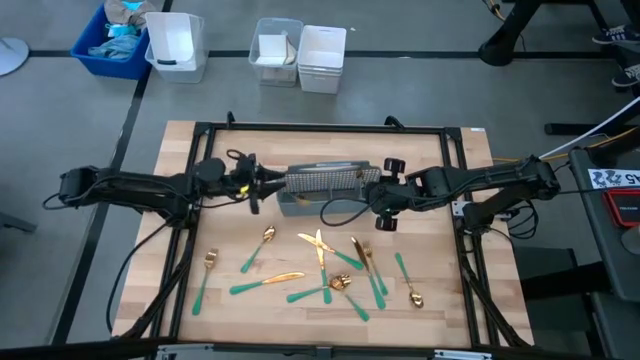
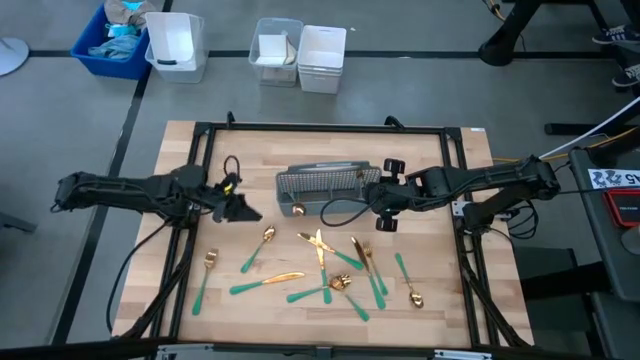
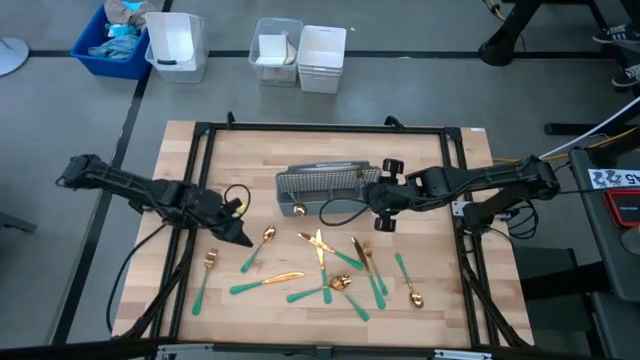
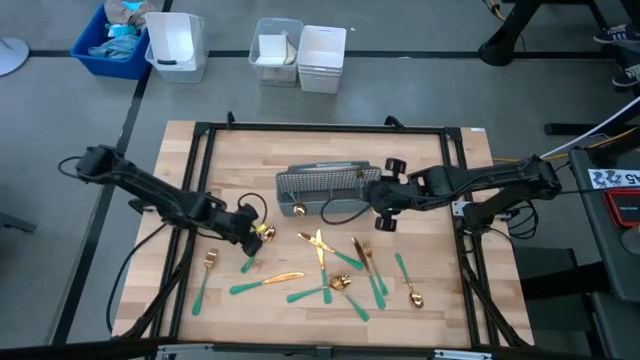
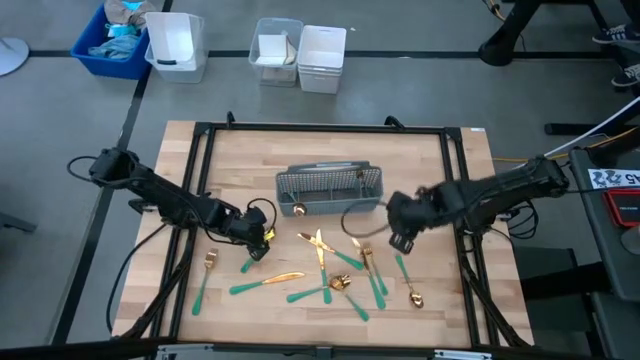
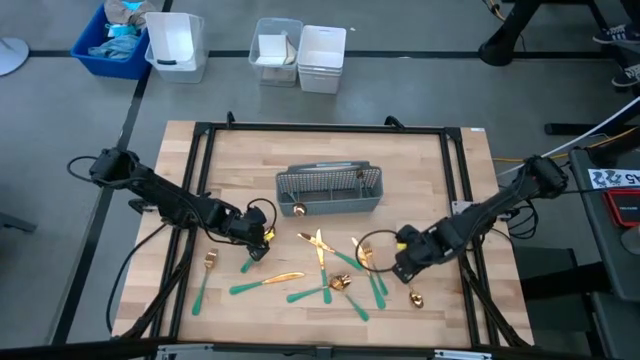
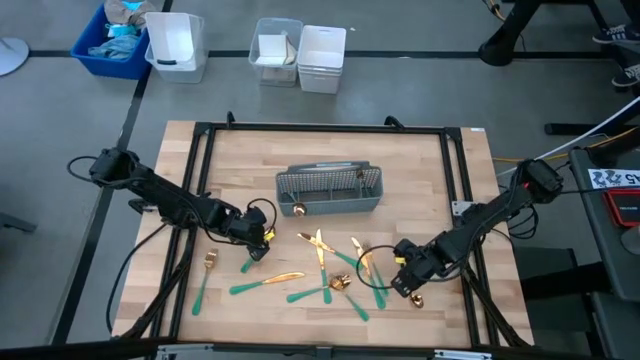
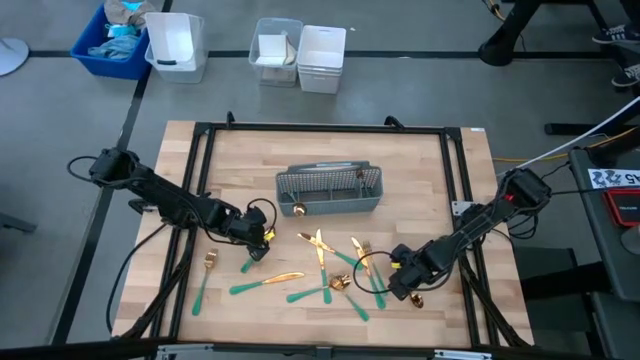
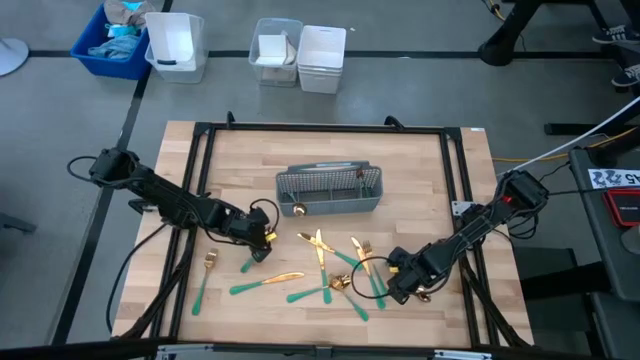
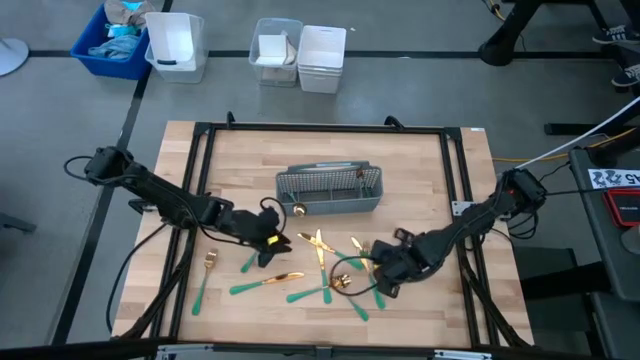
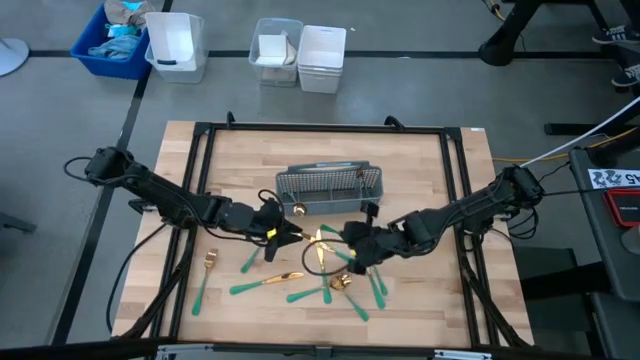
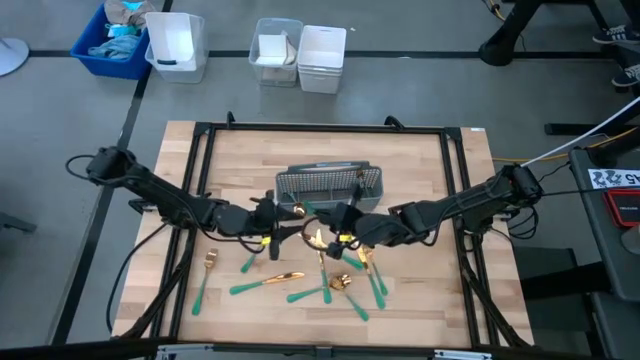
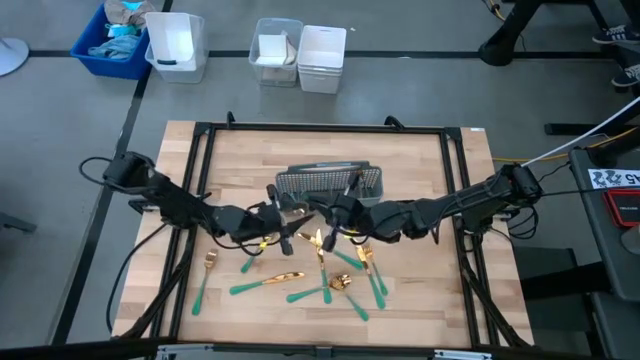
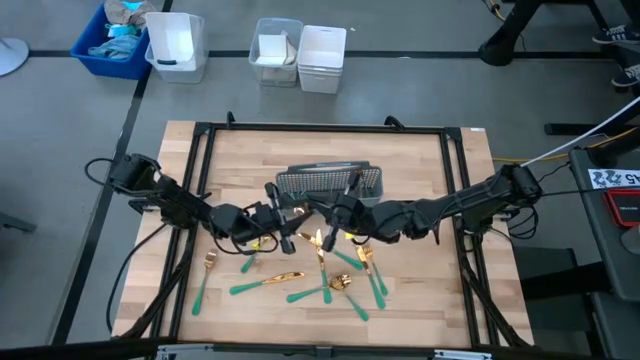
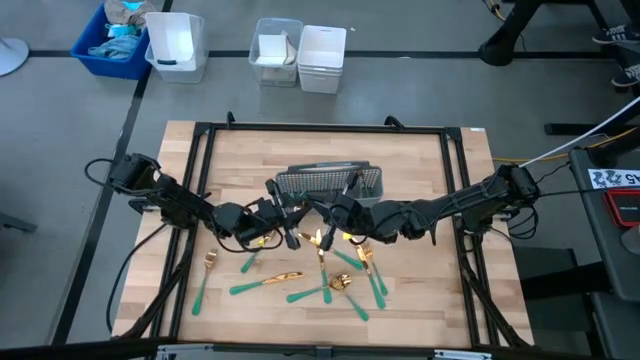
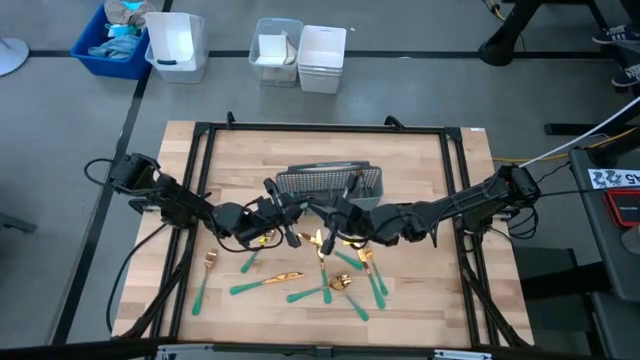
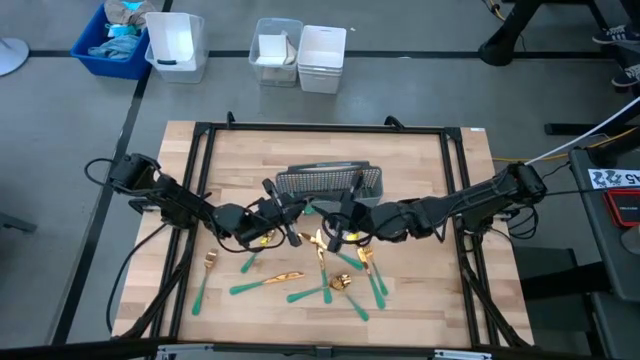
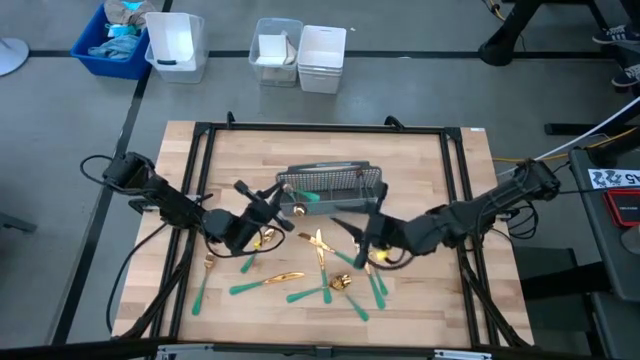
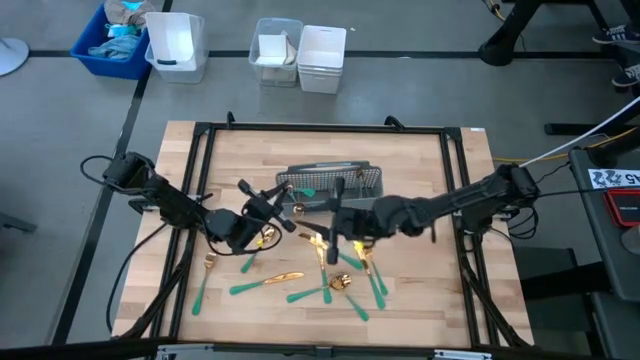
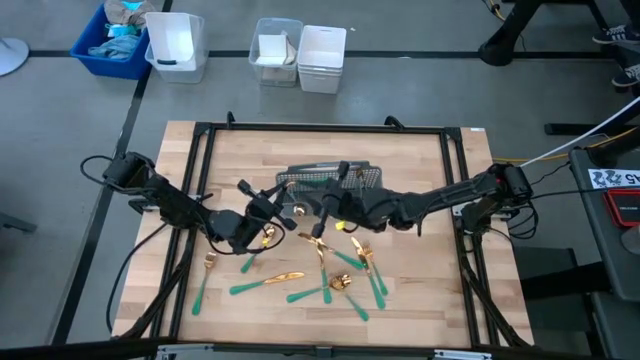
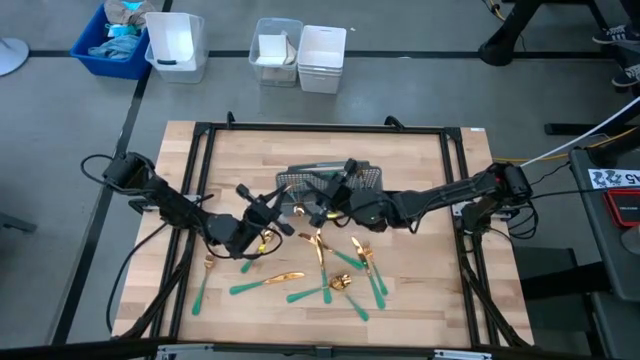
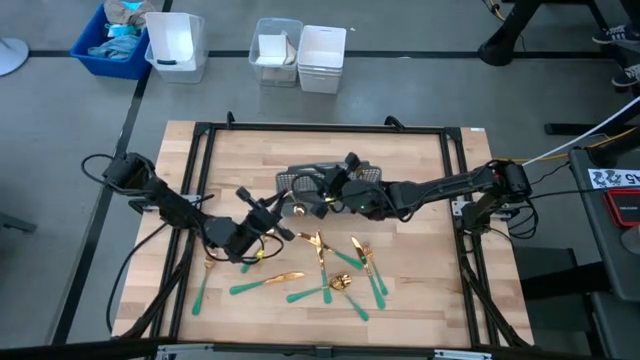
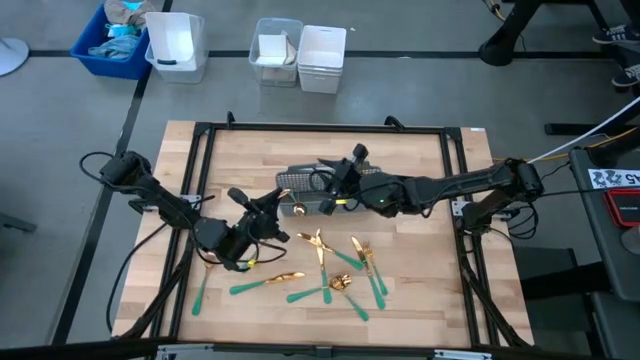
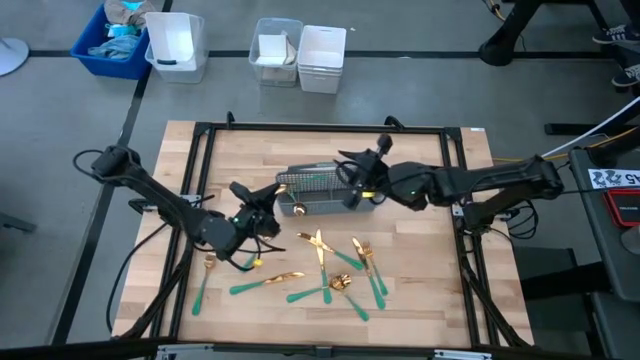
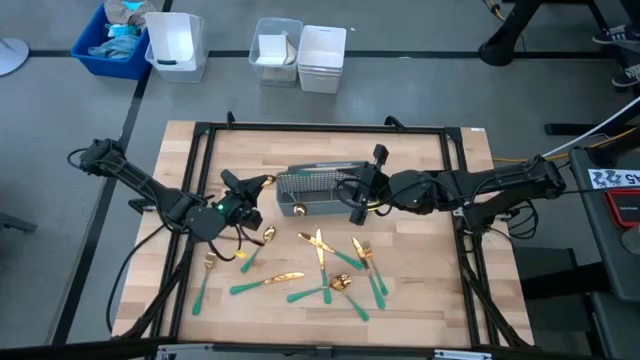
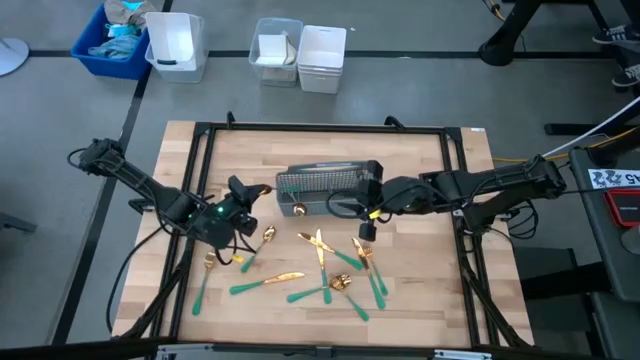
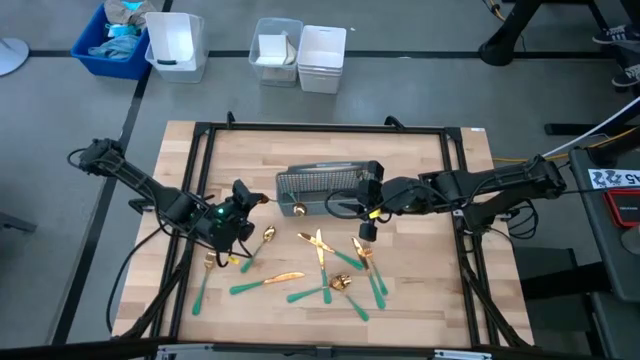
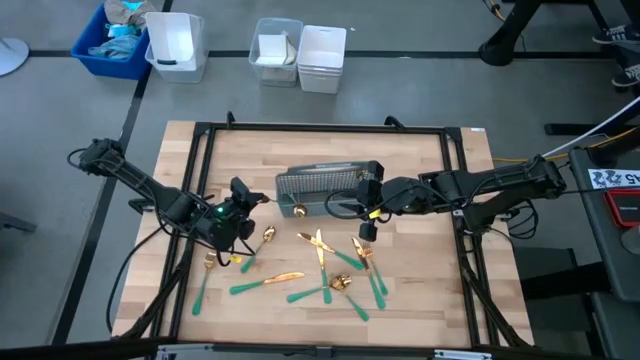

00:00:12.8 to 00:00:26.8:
Task: Sort silverware
Put the green spoon in the gray silverware basket

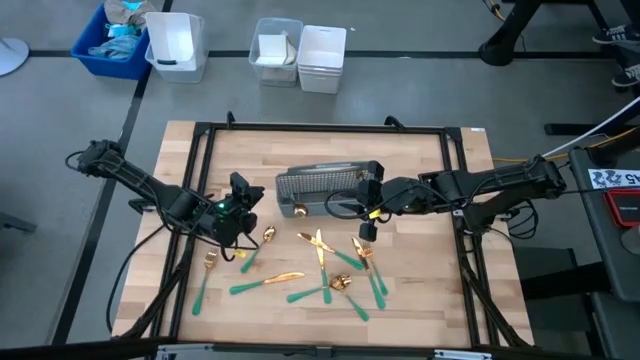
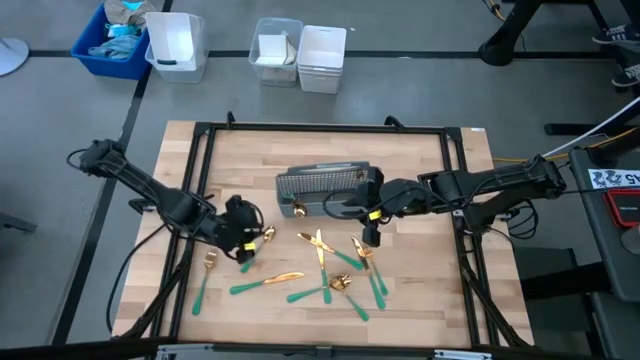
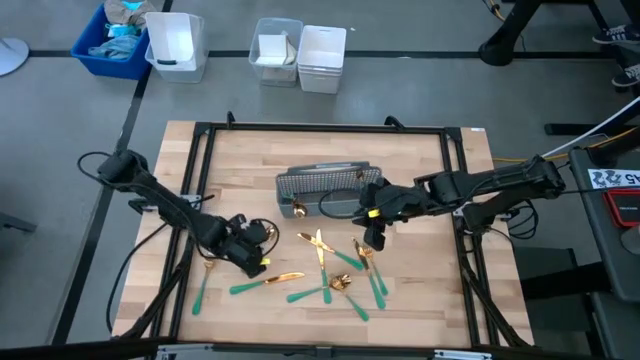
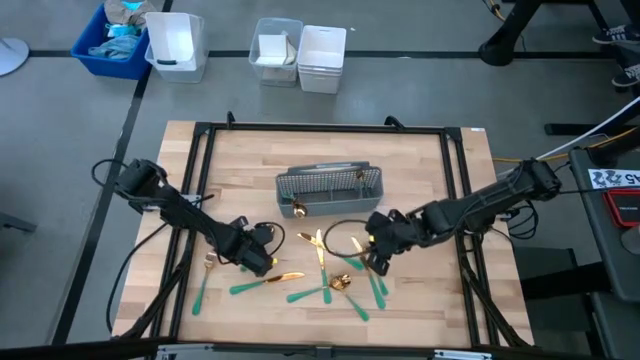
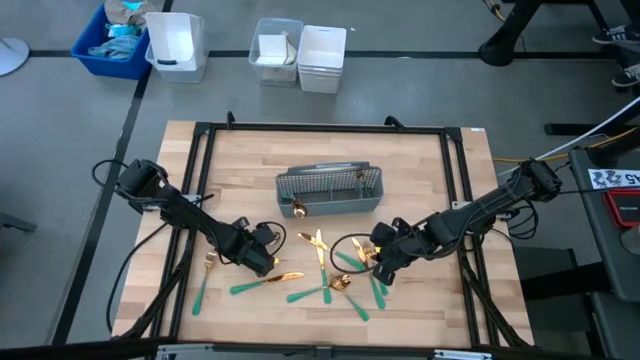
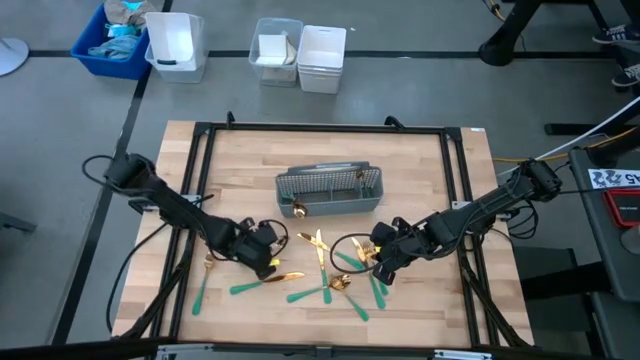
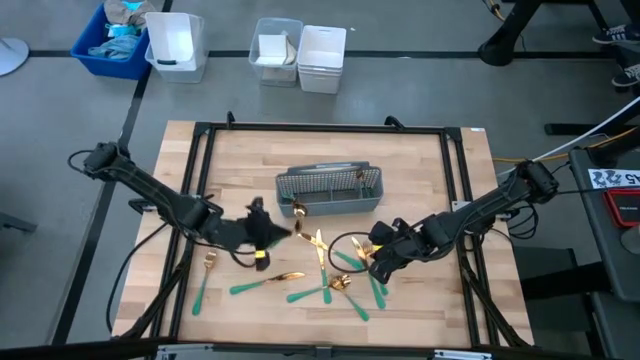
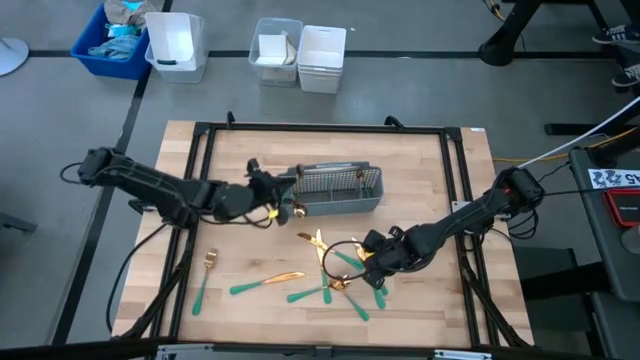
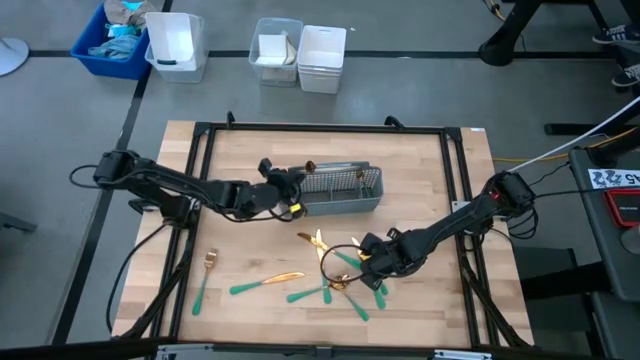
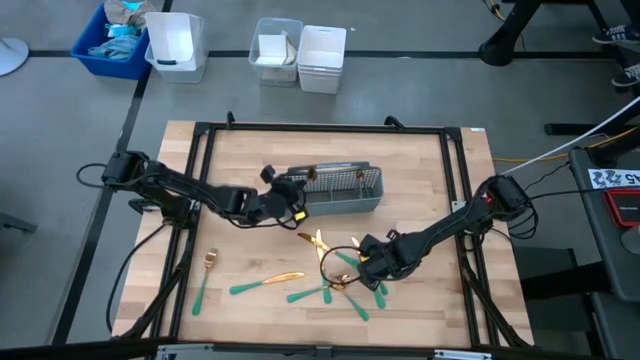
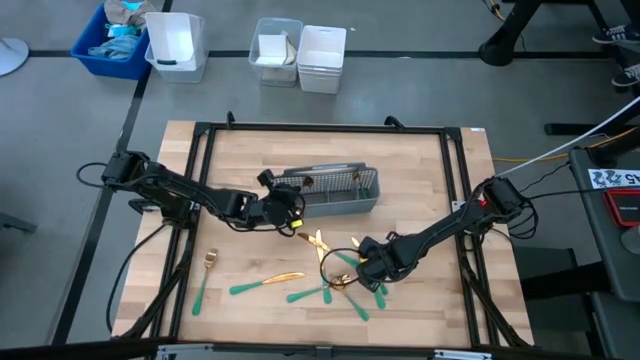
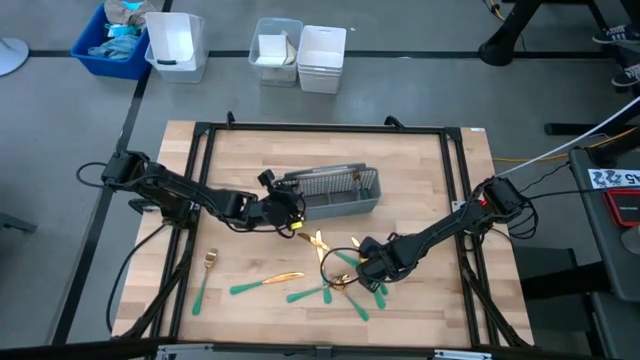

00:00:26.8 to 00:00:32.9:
Put the green spoon in the gray silverware basket

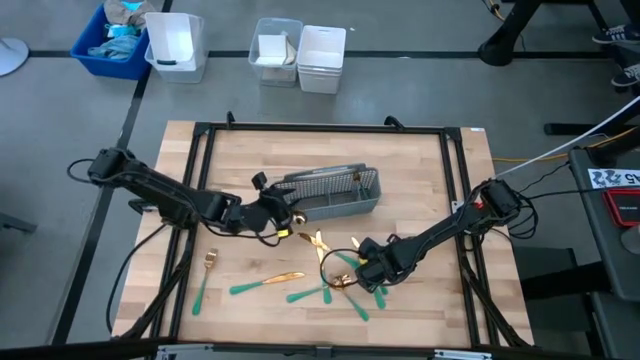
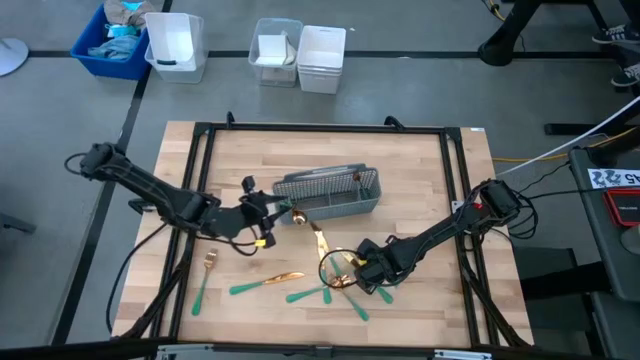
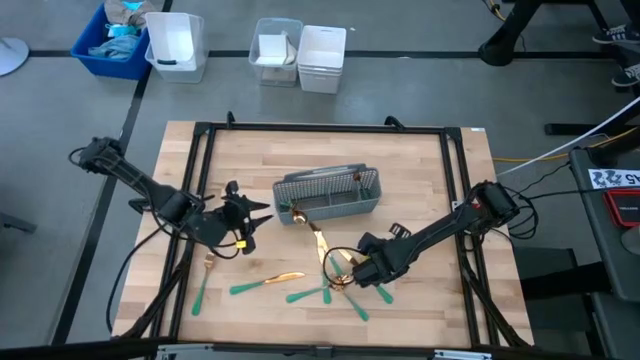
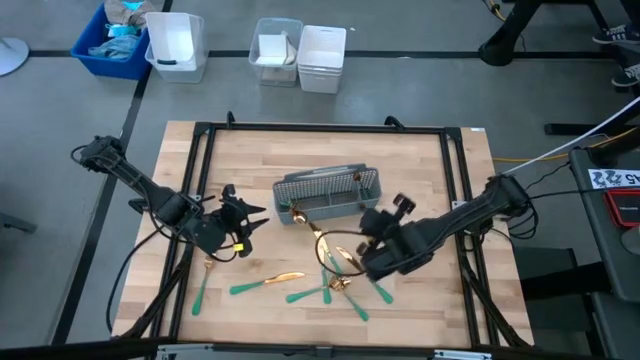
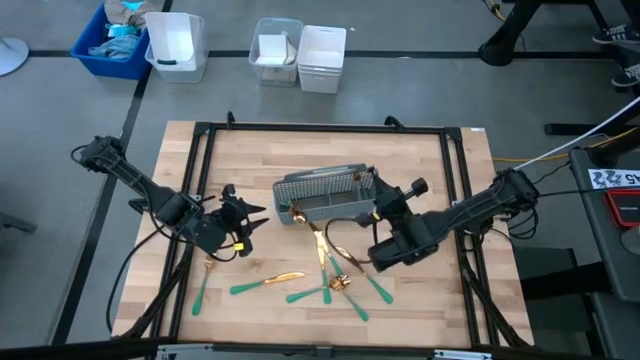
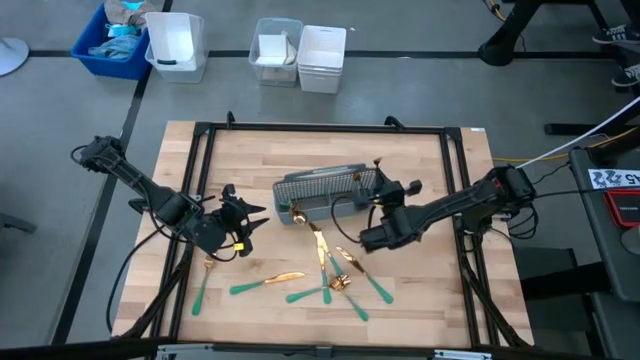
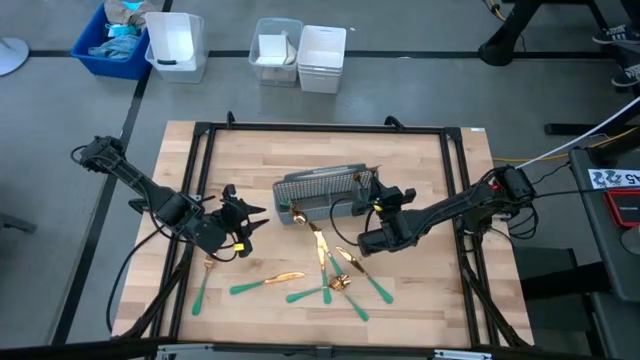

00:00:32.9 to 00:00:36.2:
Put the green fork in the gray silverware basket
